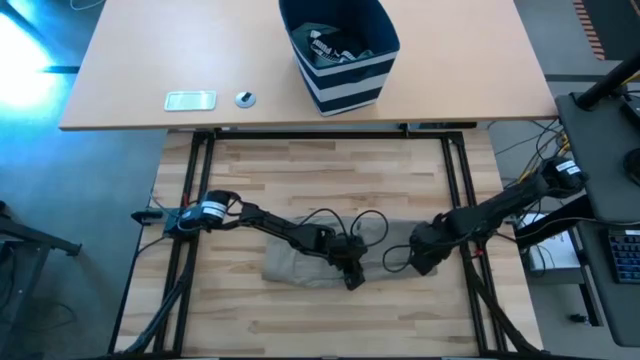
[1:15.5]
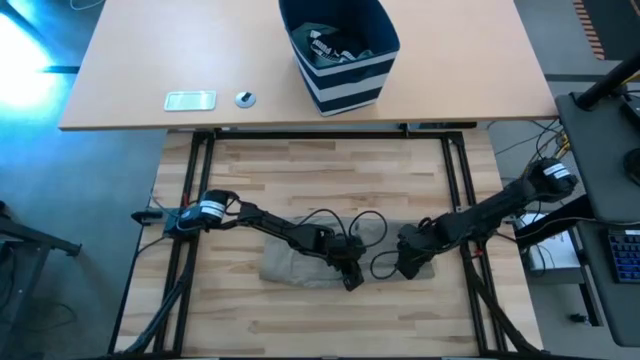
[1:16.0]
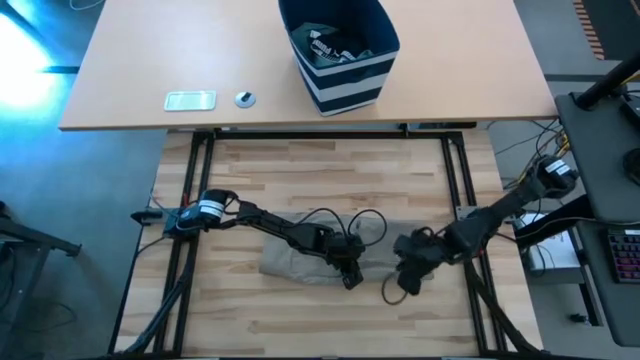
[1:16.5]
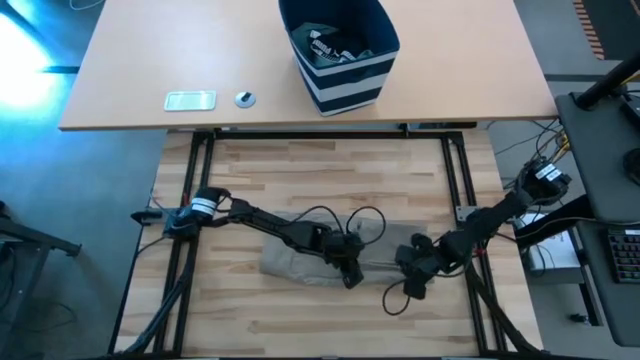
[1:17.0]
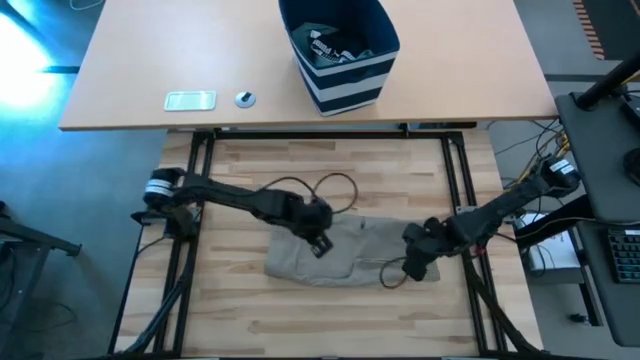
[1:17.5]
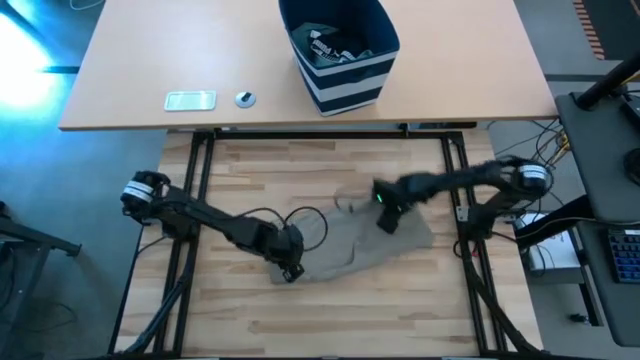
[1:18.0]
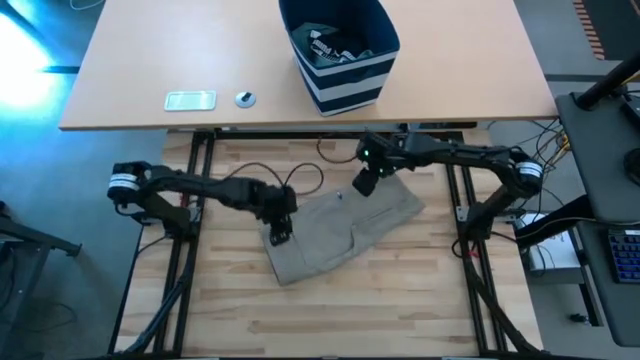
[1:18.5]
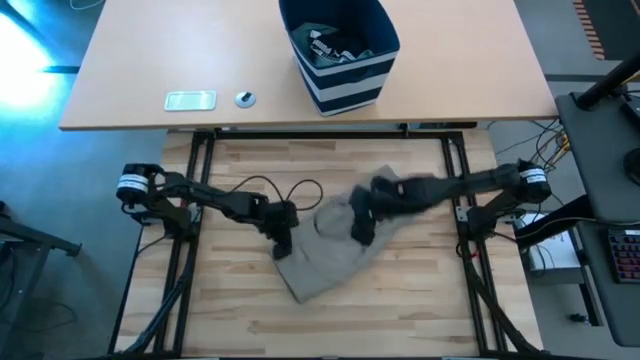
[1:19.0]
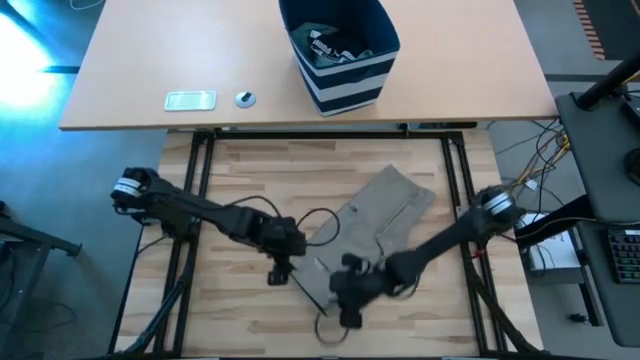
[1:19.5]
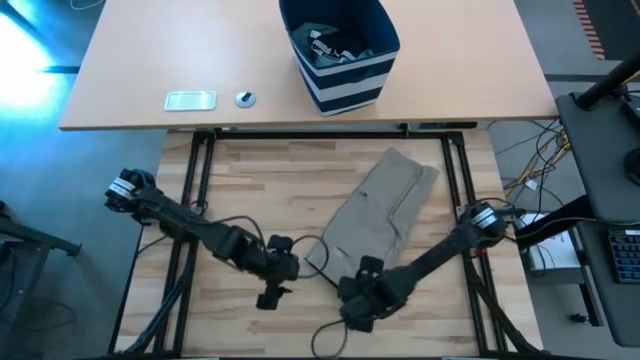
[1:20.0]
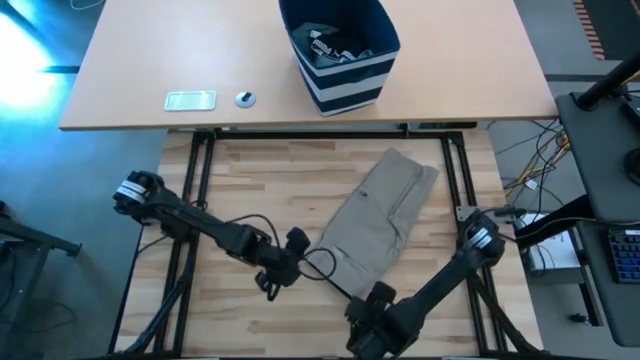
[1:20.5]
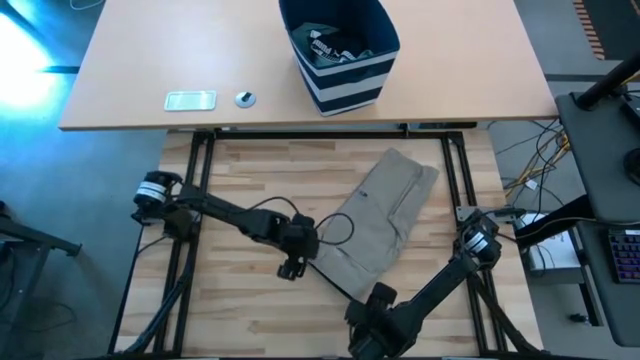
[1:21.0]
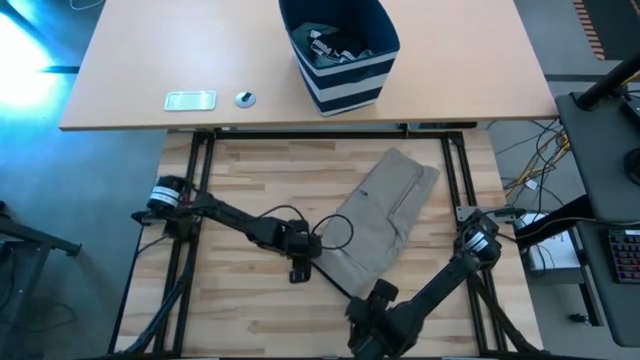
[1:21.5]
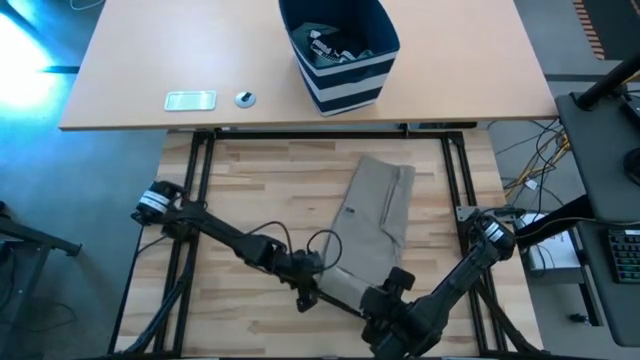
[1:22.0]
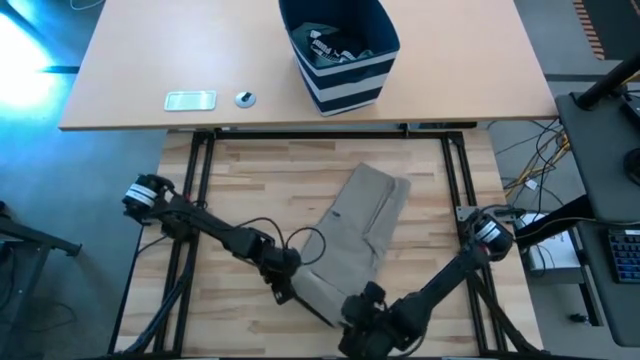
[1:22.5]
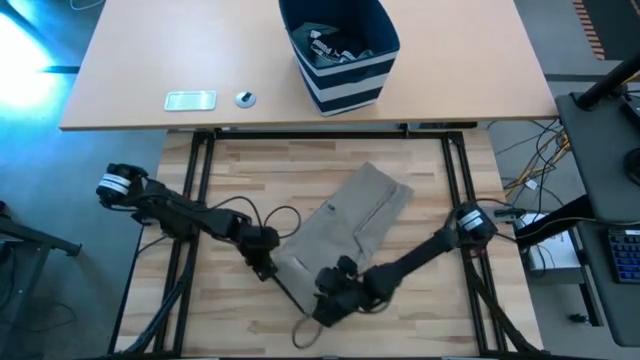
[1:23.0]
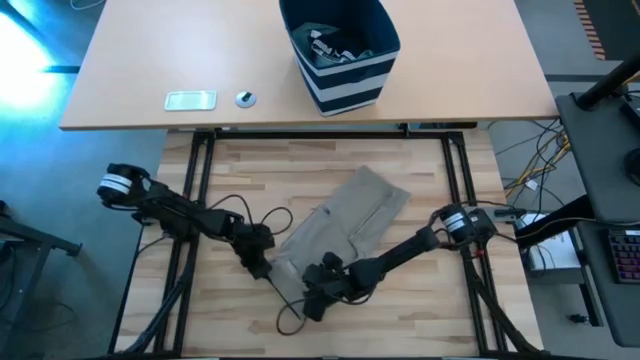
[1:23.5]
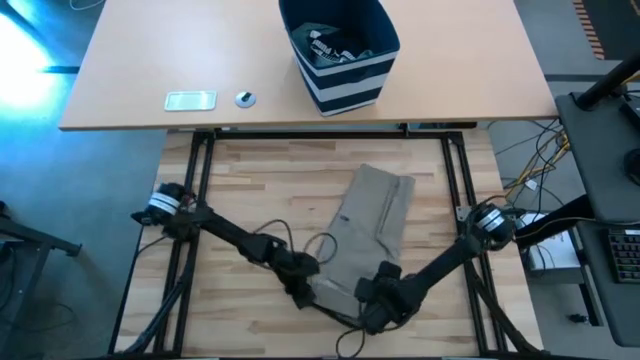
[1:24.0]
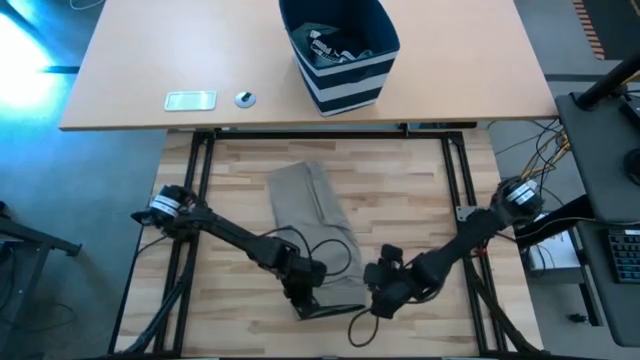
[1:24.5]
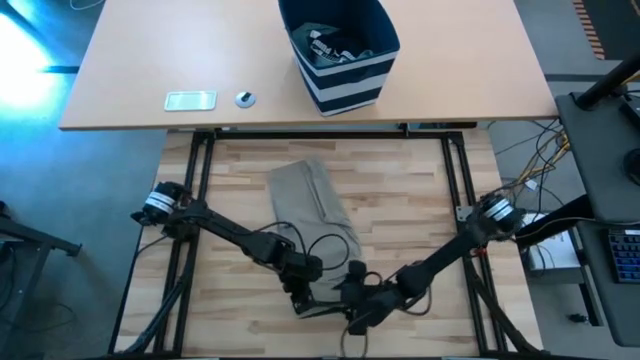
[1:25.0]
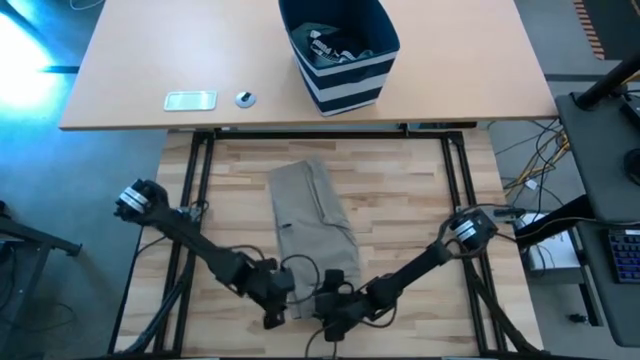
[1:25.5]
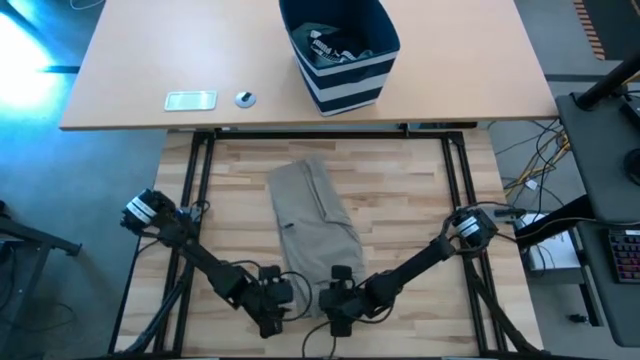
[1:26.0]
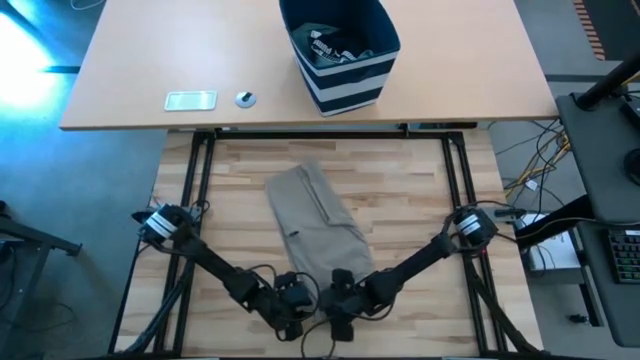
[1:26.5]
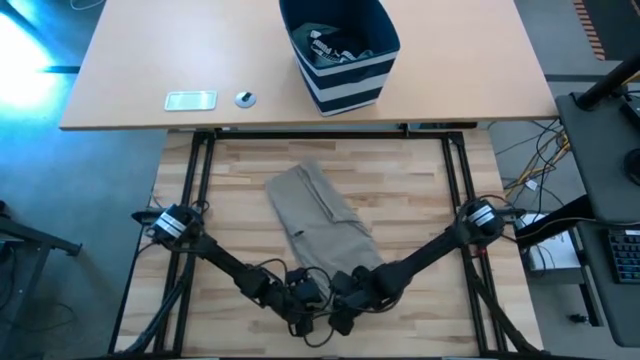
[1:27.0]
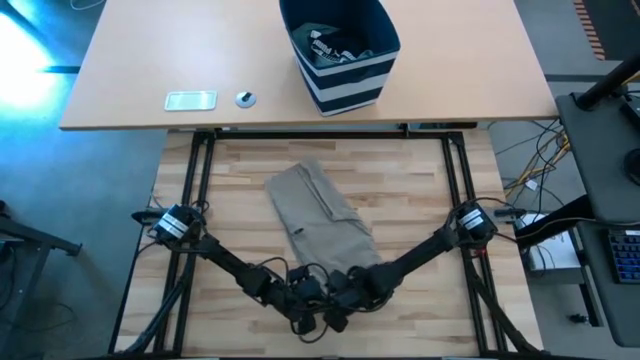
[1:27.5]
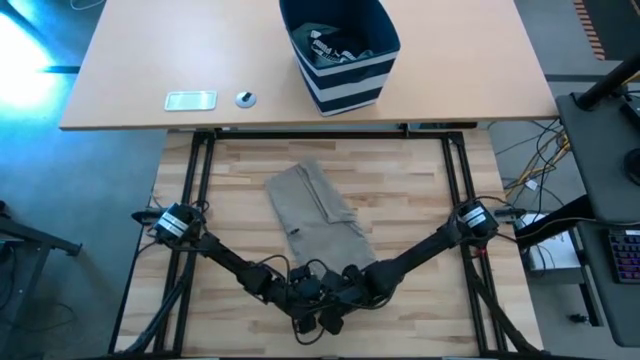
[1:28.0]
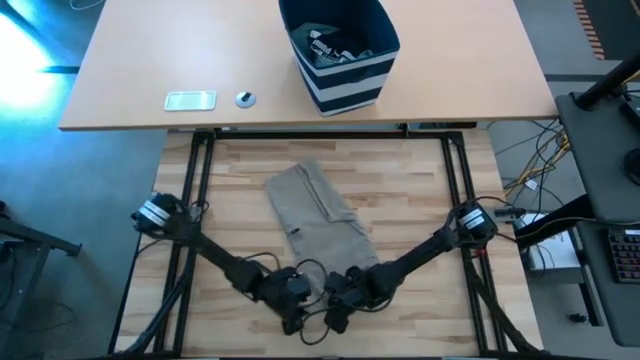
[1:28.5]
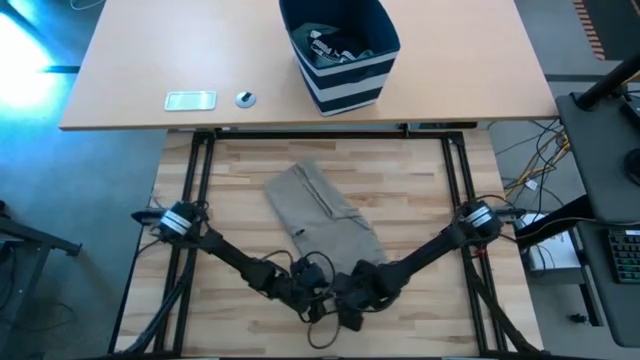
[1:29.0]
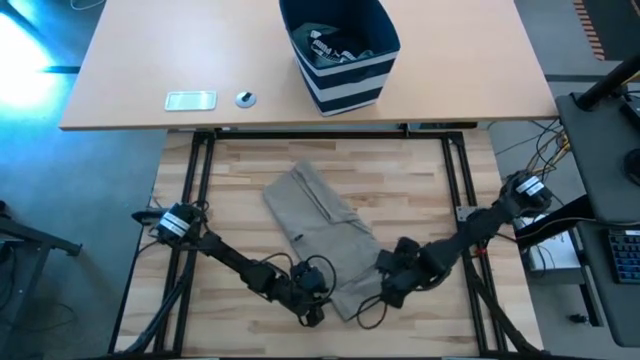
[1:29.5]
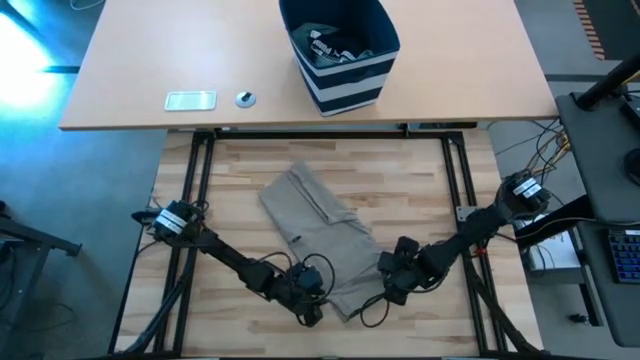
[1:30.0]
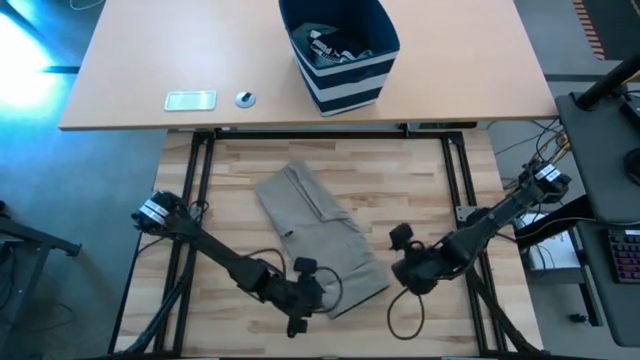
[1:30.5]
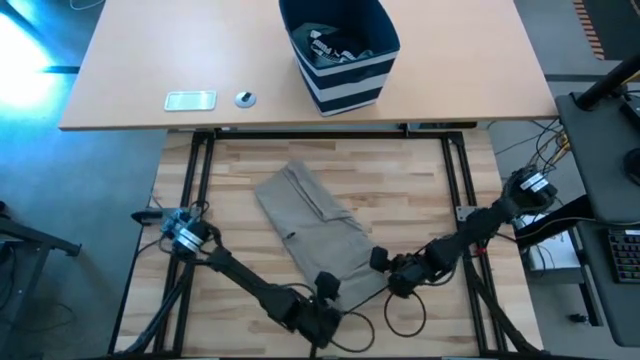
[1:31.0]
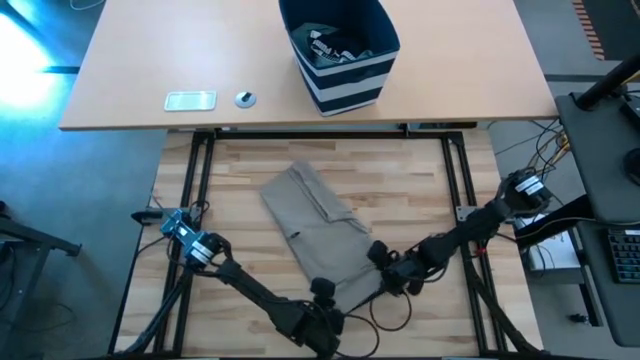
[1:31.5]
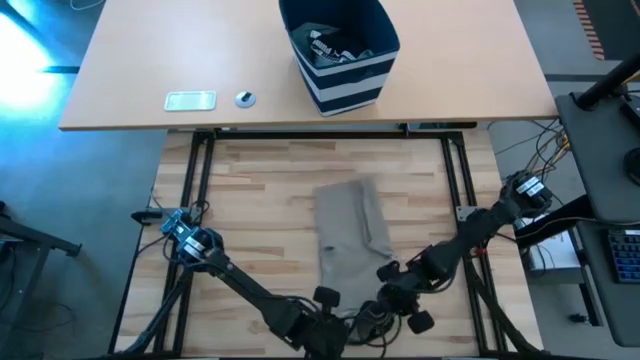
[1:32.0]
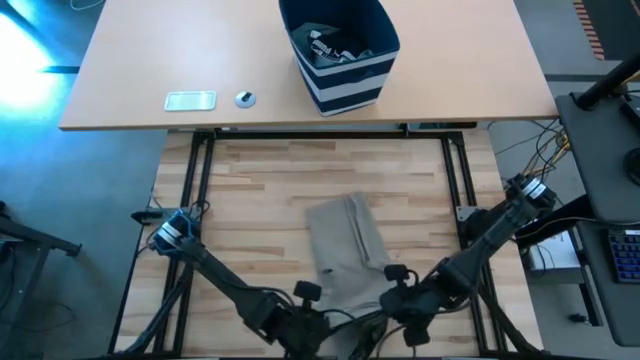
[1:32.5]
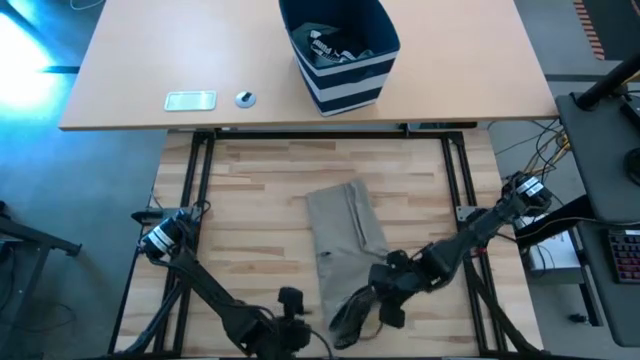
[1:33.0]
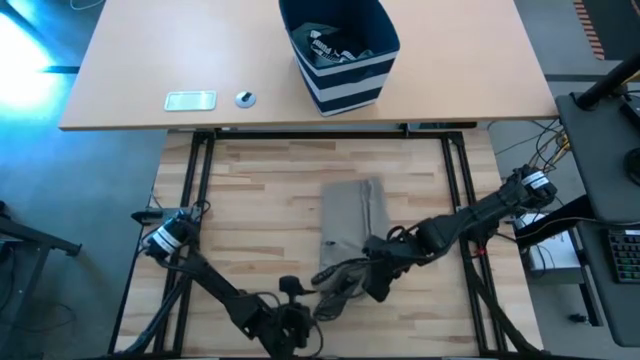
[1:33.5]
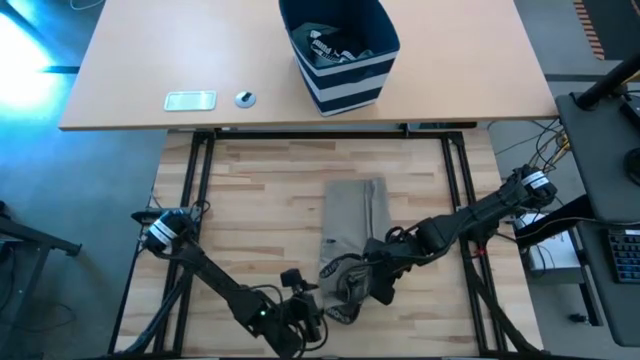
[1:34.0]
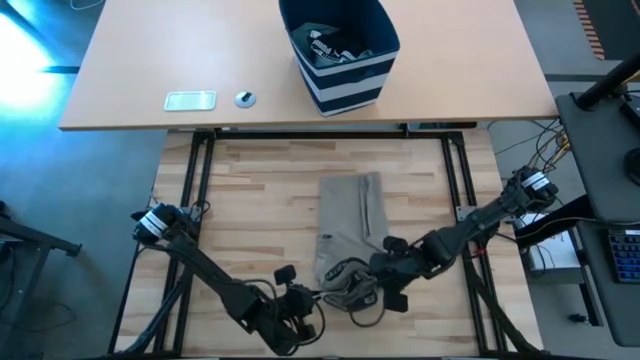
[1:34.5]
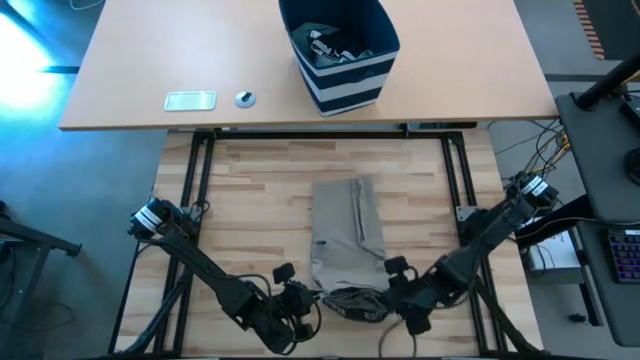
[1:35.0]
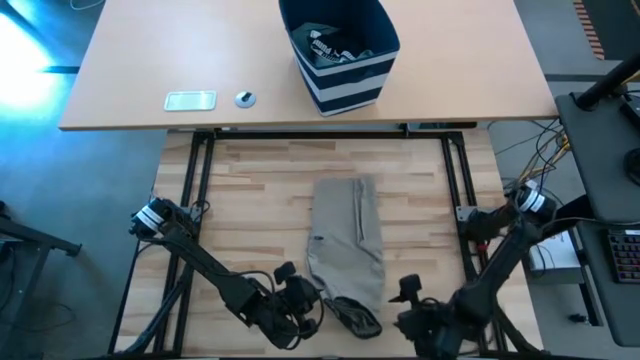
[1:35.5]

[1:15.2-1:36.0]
Task: Fold Laundry from Bin
Fold the brown shorts

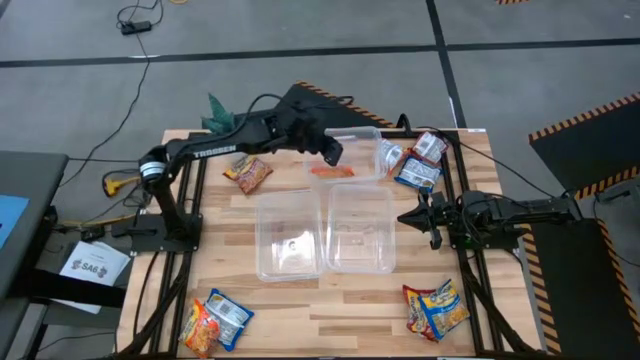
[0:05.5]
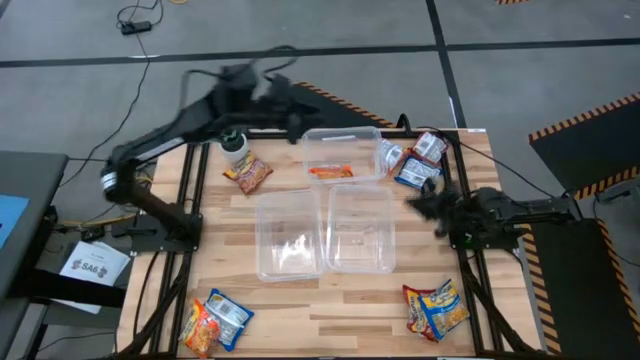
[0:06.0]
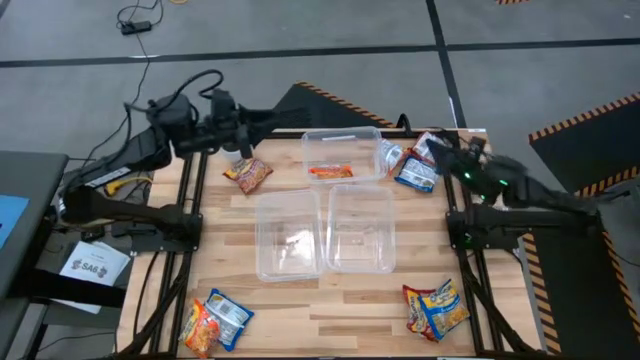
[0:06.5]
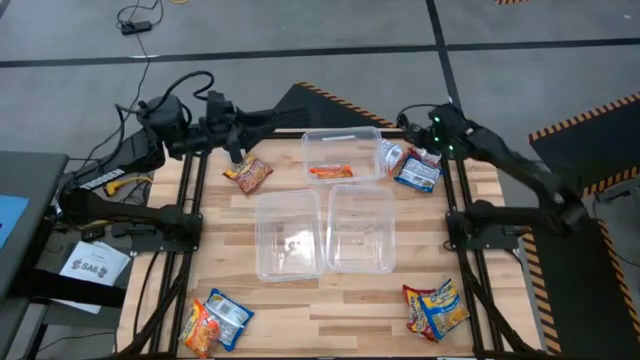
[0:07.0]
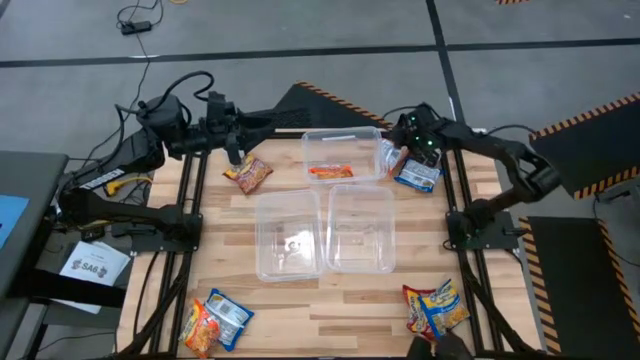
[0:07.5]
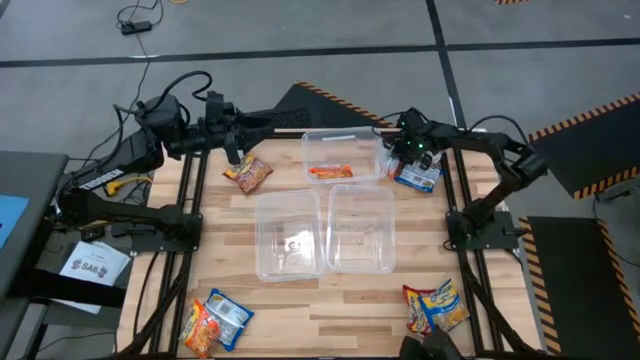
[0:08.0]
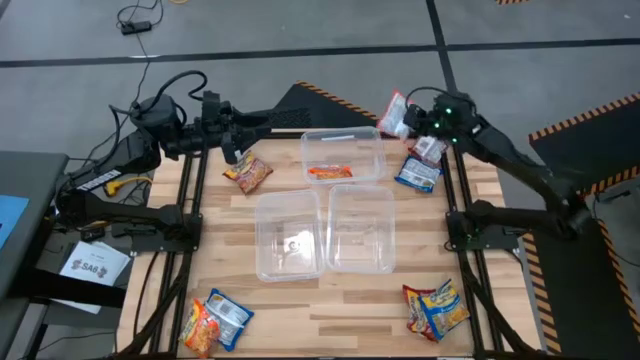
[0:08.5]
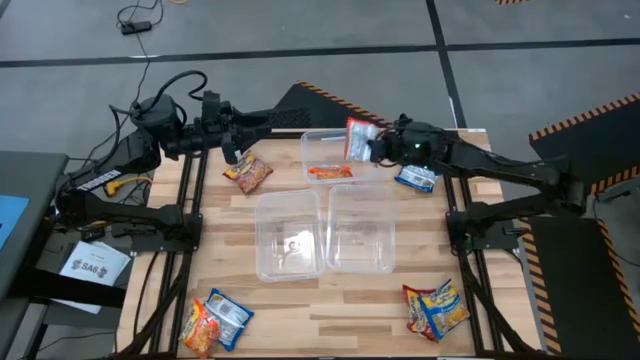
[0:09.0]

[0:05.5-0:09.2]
Task: Sort Maruchan noodles
Put the top orange noodle pack into the top transparent bin
